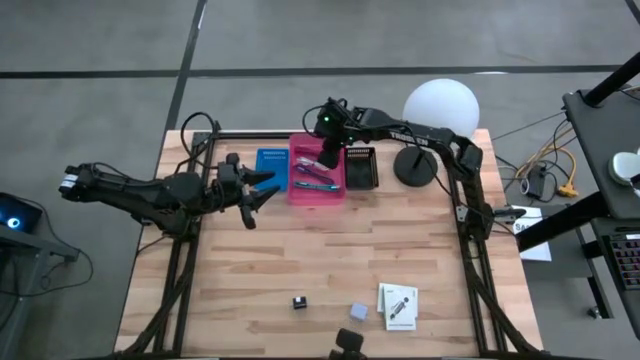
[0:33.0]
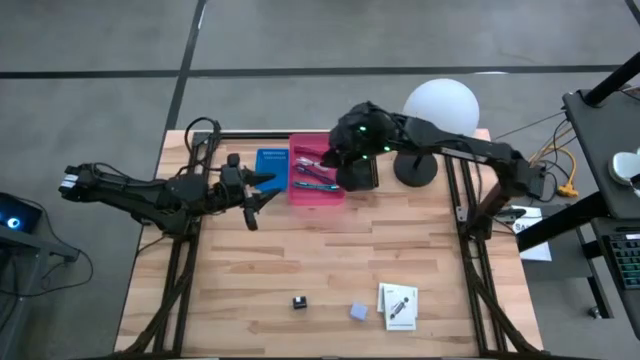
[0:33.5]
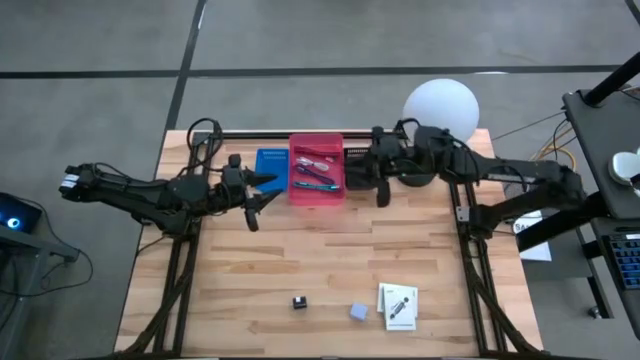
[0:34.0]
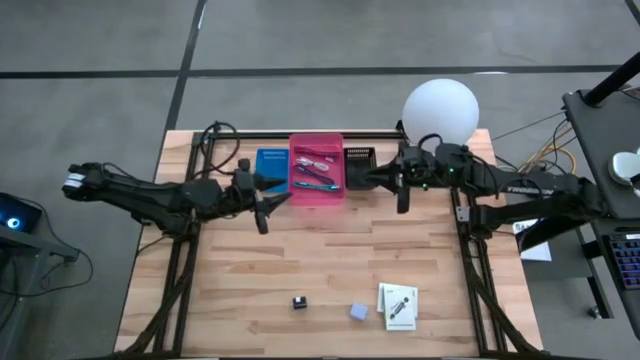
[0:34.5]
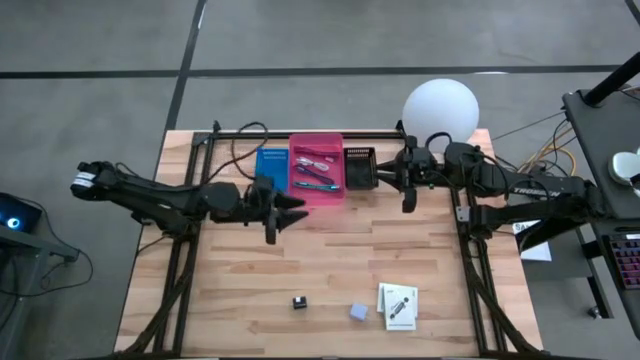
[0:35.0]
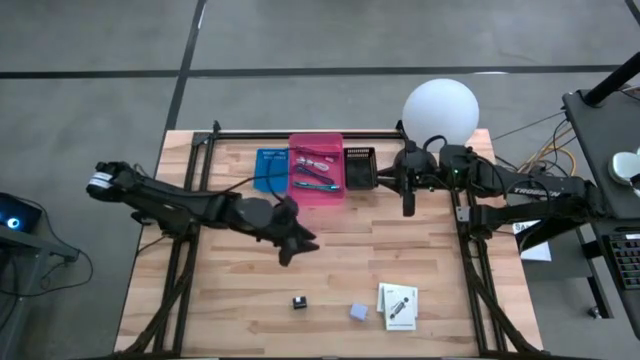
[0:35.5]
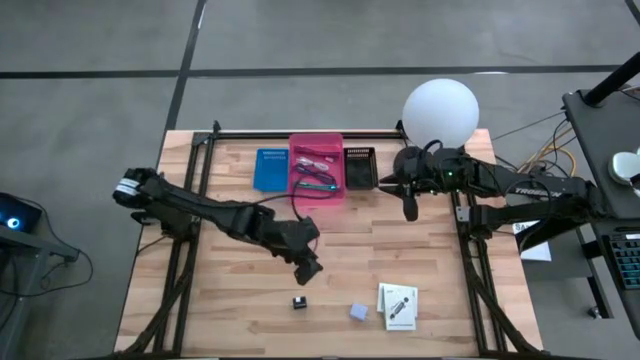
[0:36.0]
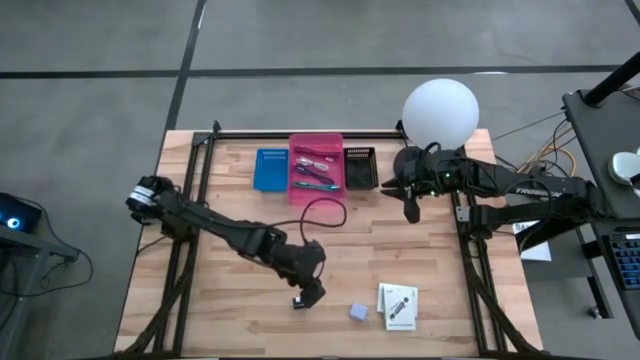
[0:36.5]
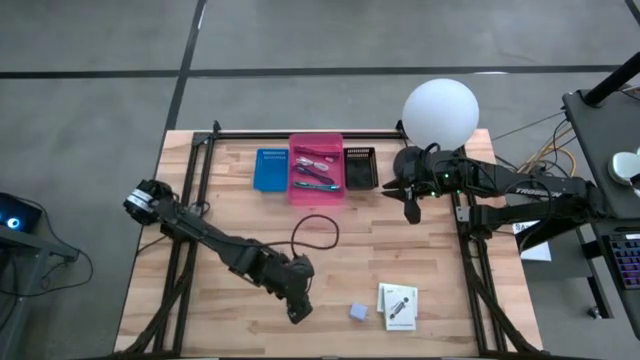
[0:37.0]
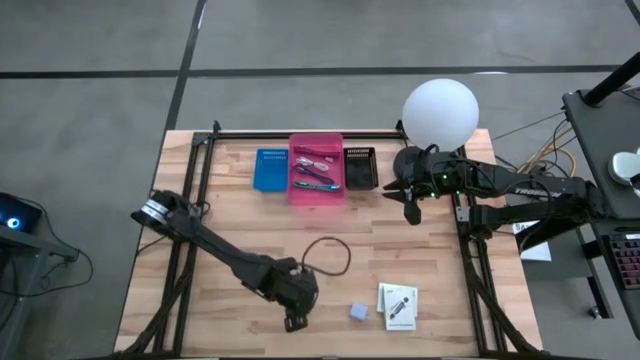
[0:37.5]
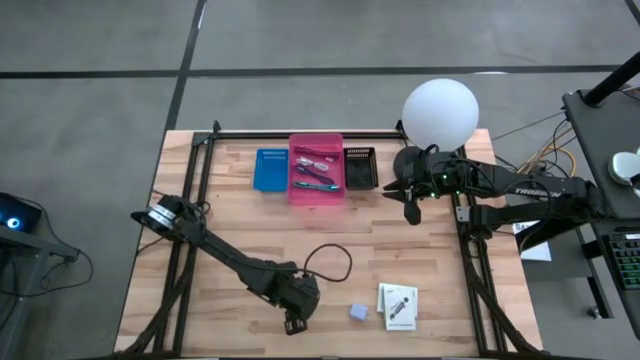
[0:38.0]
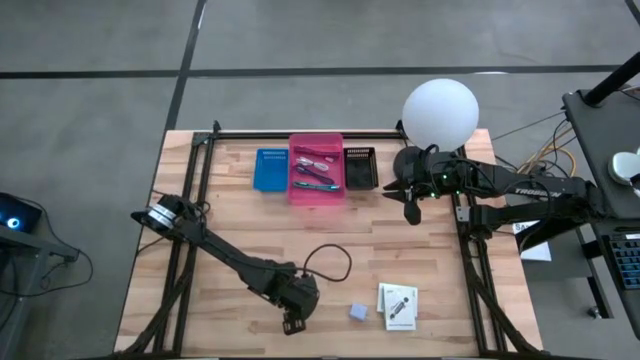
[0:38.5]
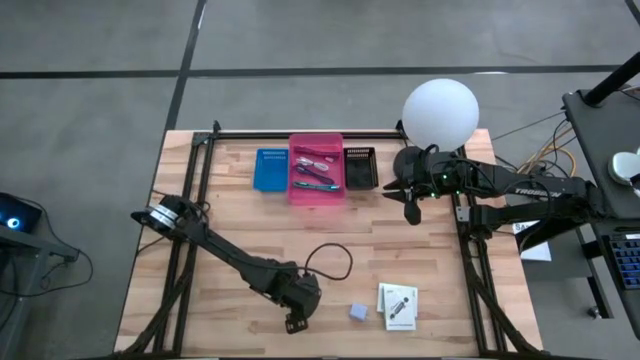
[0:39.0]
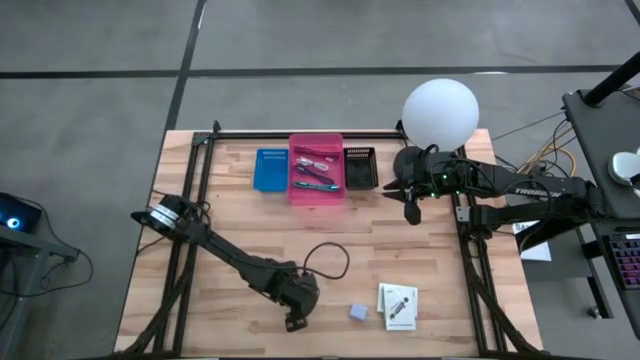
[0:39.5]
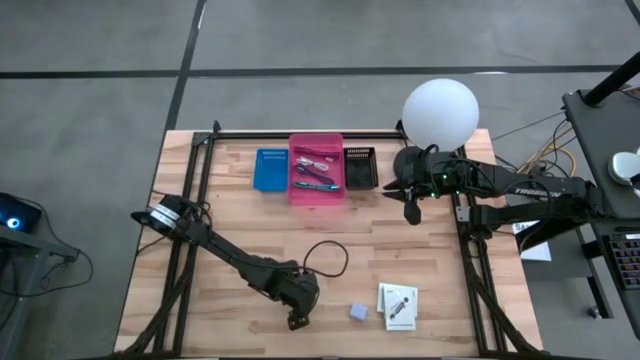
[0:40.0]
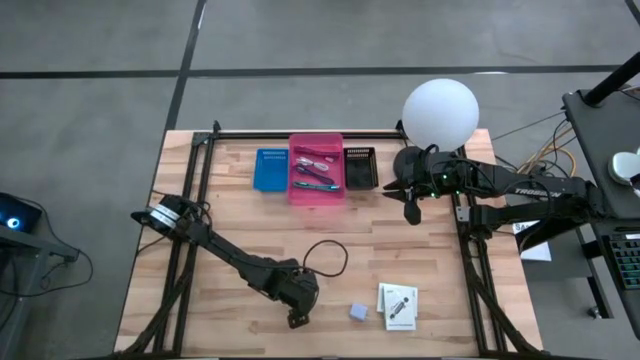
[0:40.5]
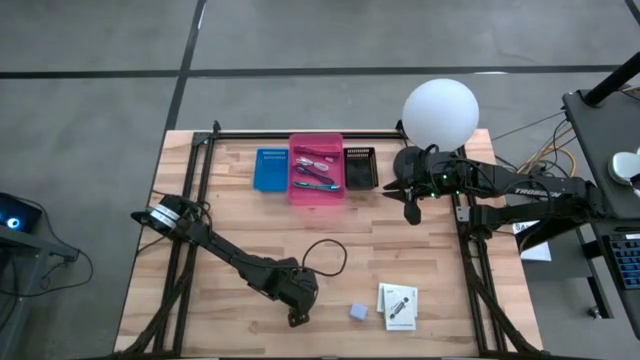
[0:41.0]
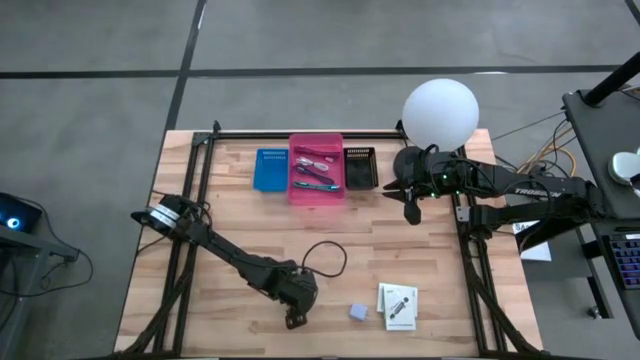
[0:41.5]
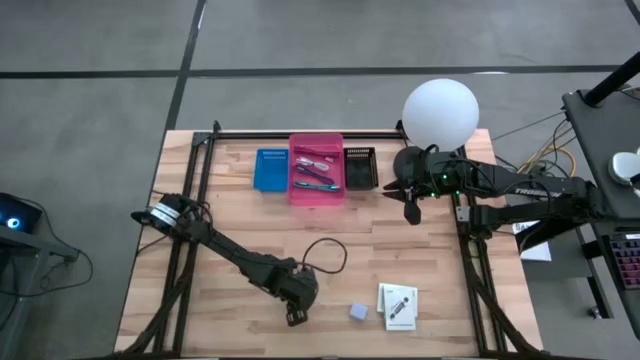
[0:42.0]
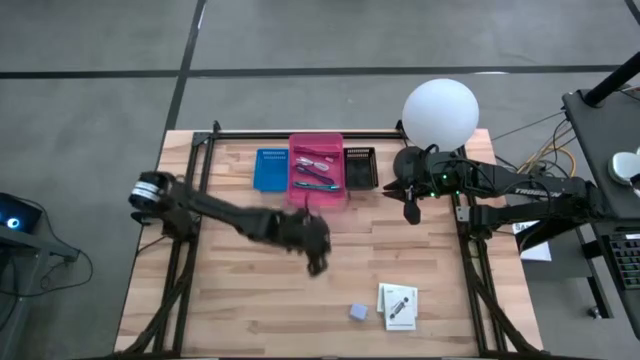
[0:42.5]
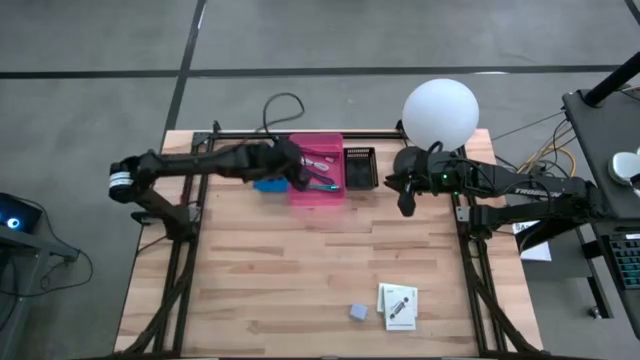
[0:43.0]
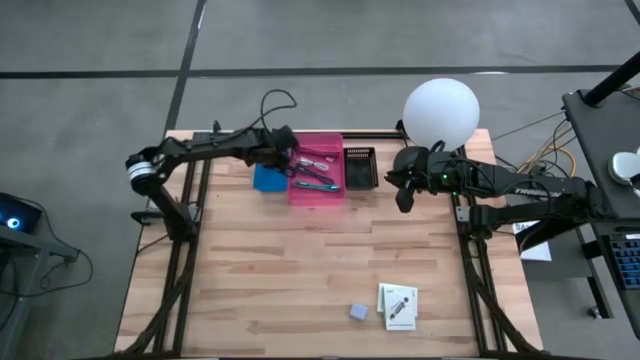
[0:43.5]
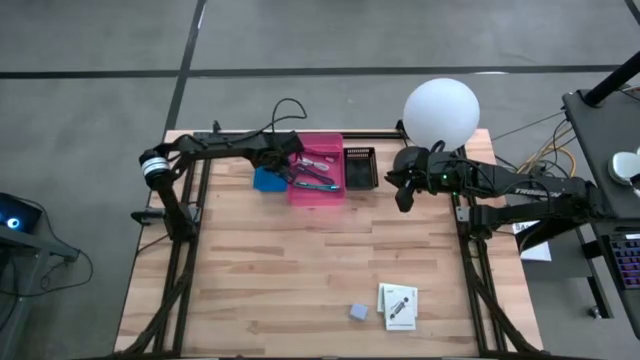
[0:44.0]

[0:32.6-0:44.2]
Task: Pick and place items into bin
Put the black charger adapter into the blue bin

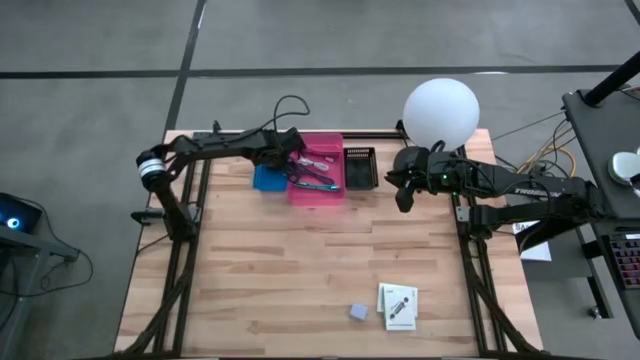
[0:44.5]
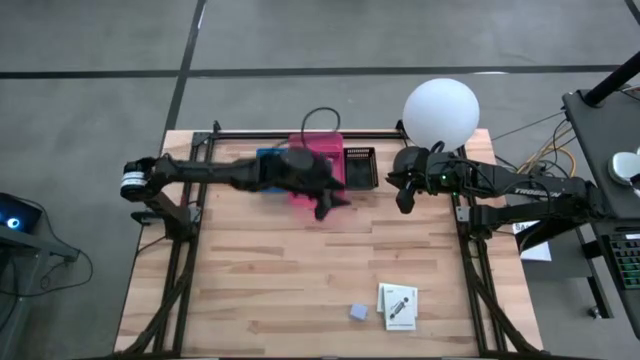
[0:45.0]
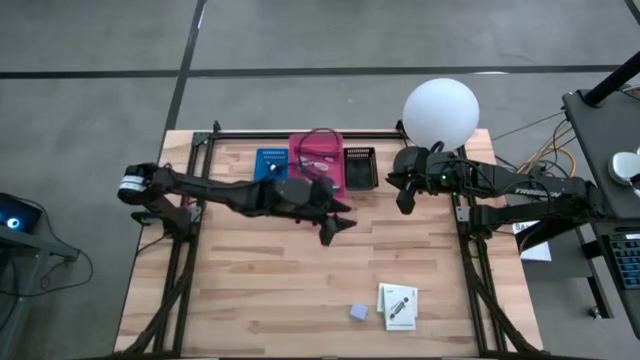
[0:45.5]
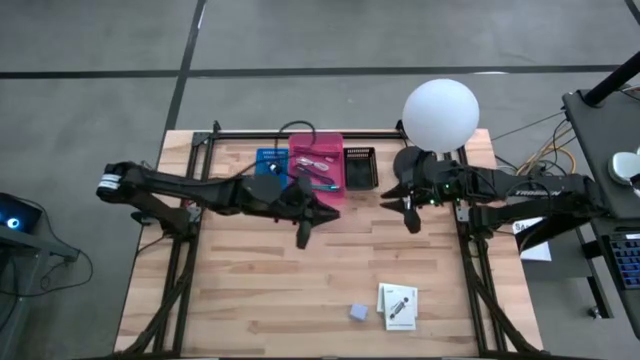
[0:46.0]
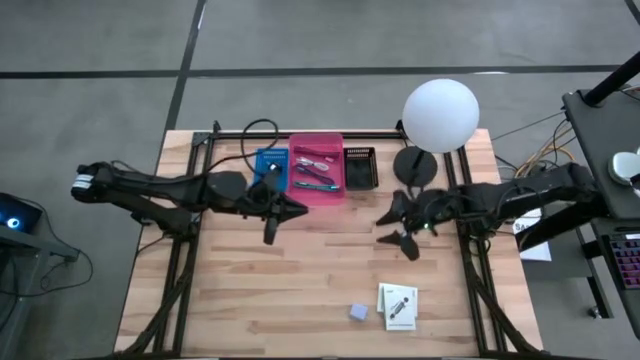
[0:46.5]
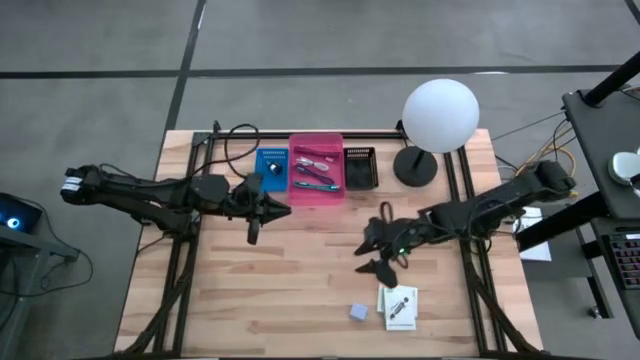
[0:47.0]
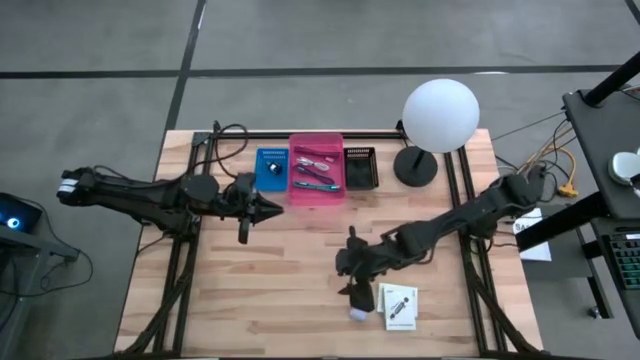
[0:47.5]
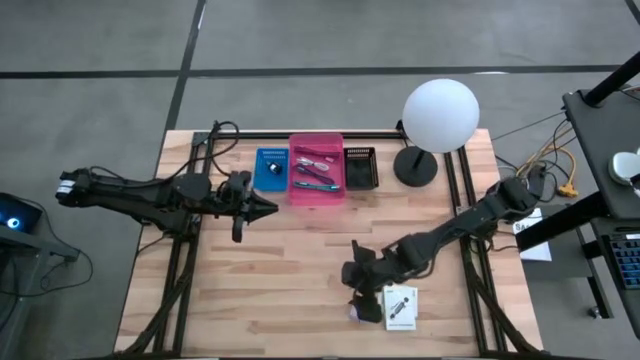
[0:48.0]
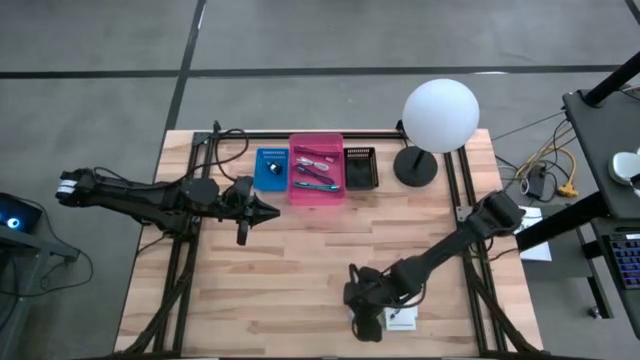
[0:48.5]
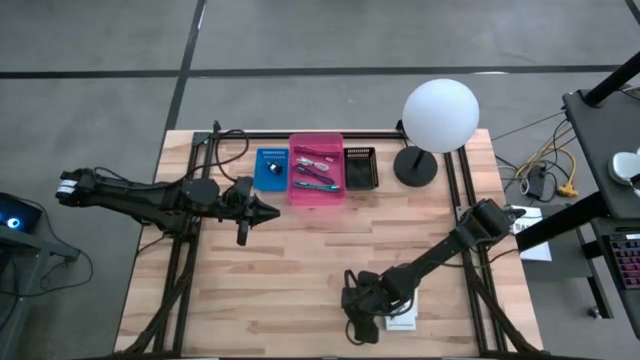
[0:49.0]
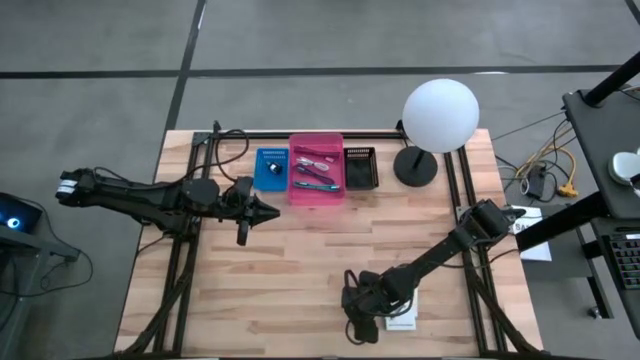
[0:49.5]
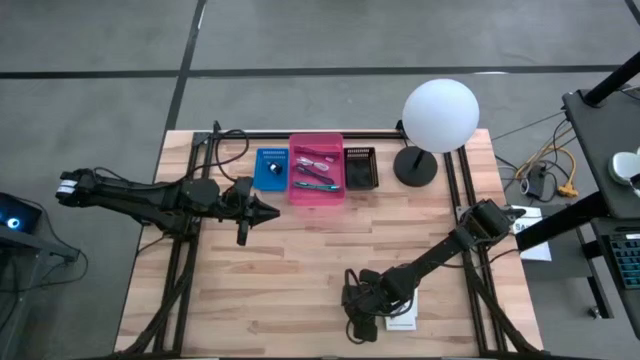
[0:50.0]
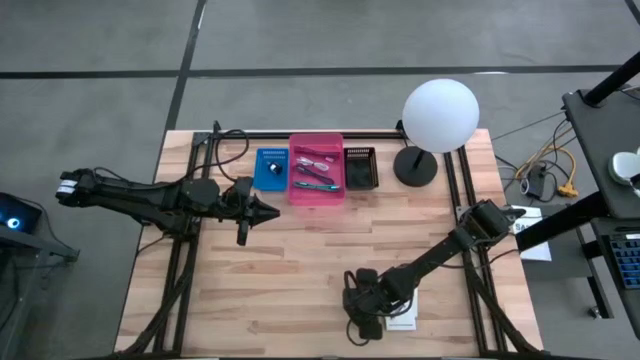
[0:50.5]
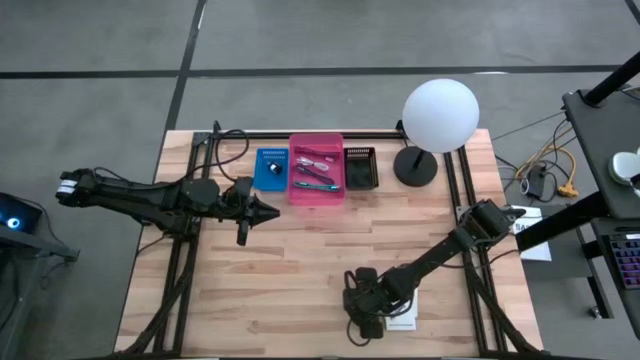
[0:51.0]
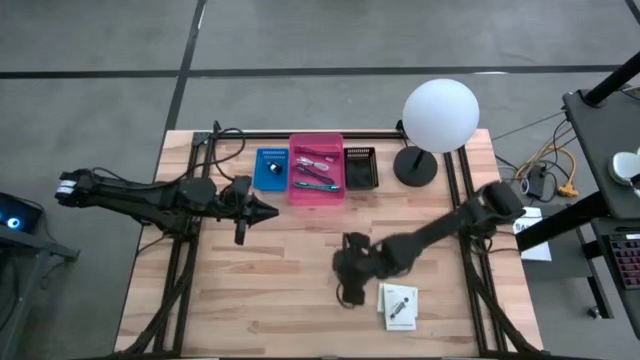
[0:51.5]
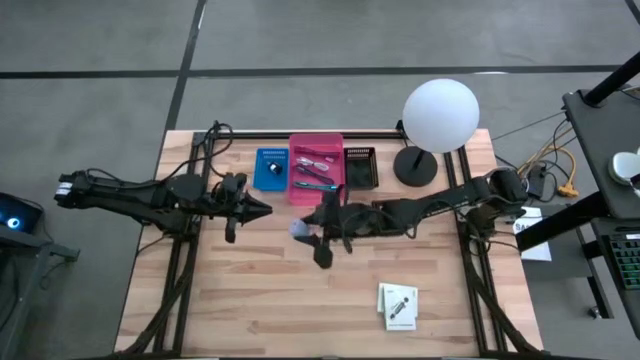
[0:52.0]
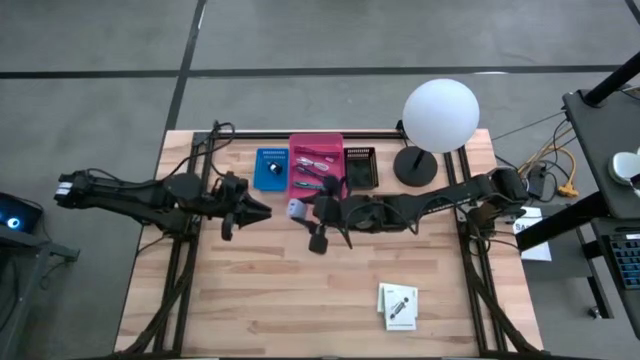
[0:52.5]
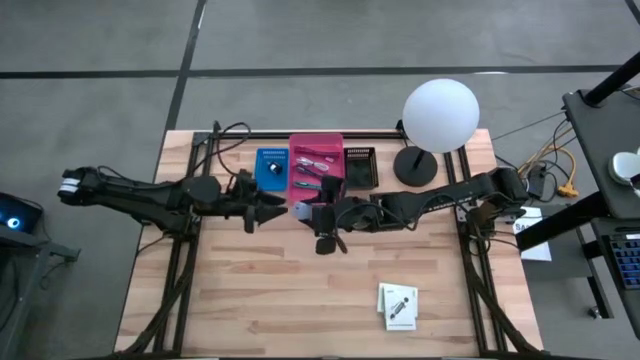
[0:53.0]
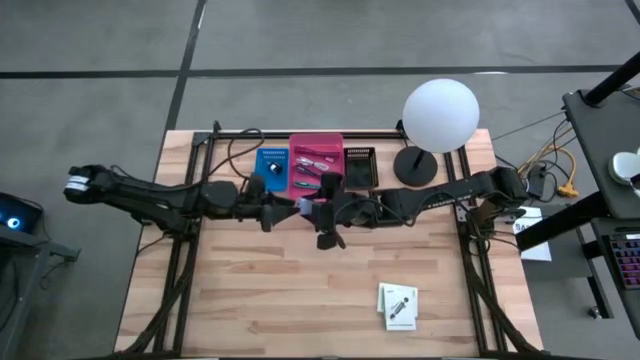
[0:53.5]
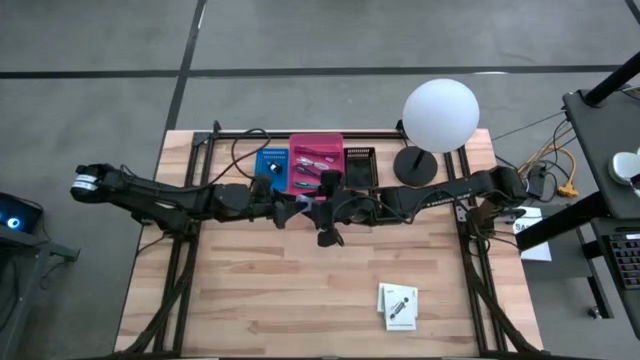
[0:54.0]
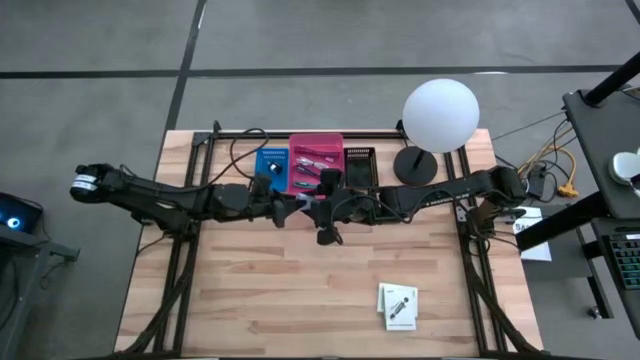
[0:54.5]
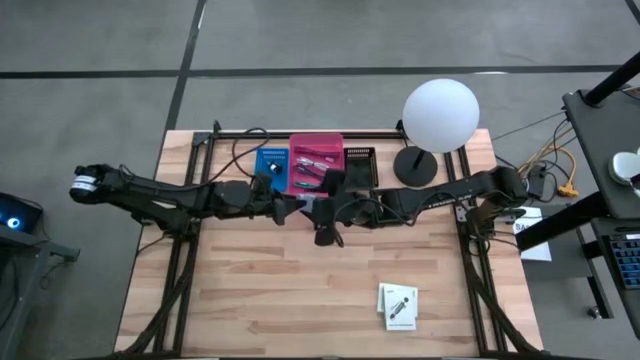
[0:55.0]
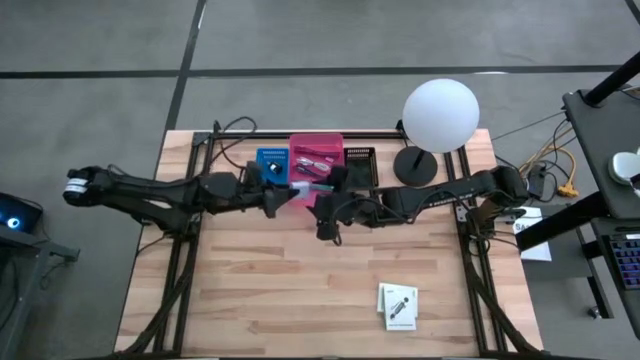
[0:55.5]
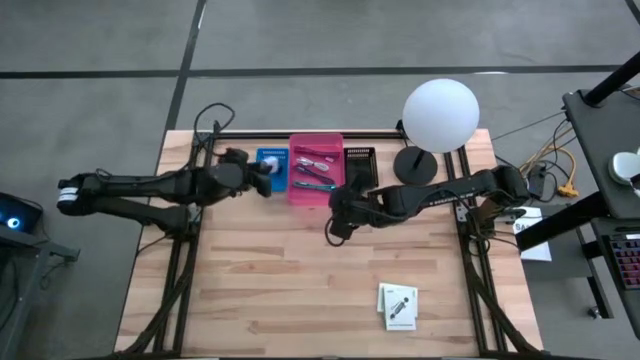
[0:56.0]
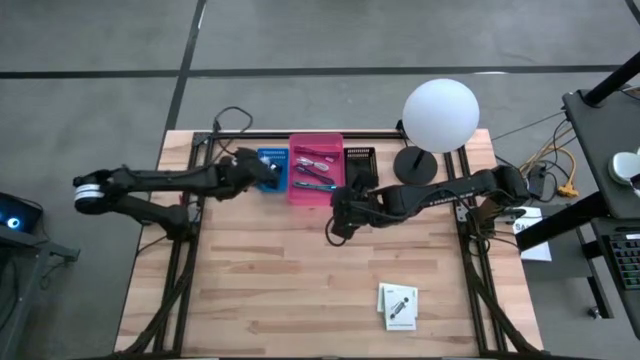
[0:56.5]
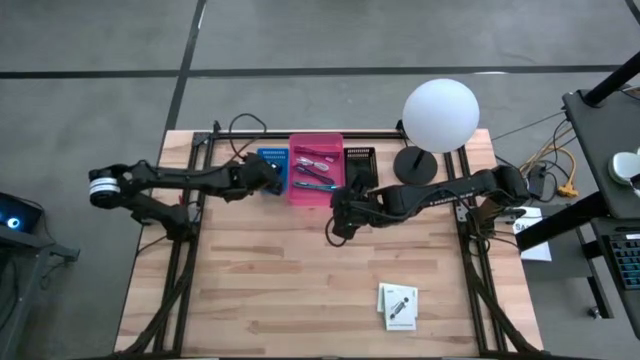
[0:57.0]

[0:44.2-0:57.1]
Put the violet charger adapter into the blue bin
